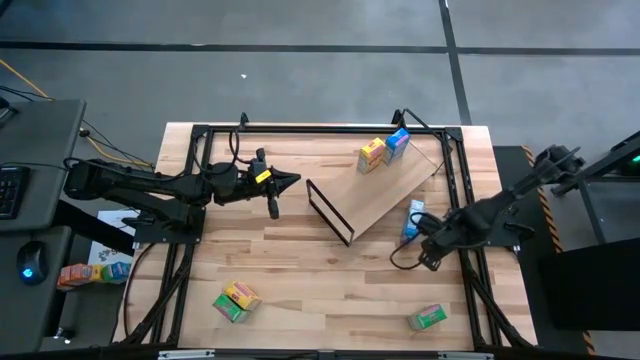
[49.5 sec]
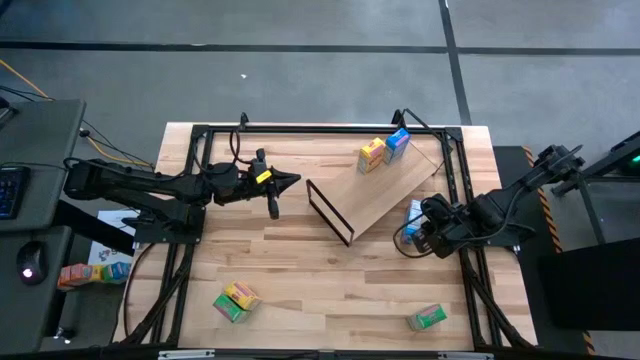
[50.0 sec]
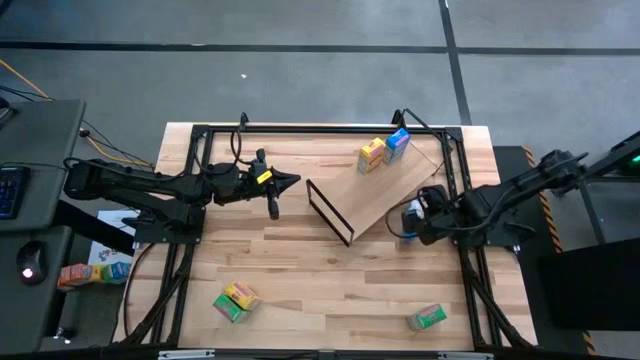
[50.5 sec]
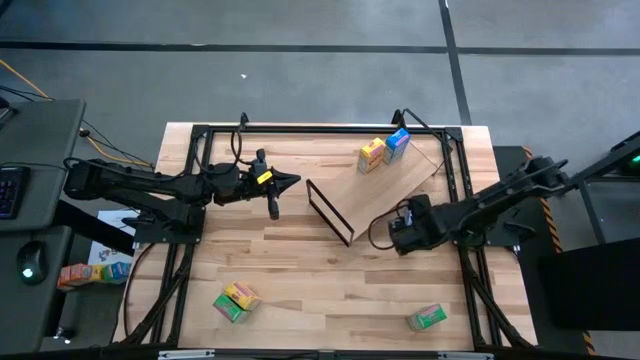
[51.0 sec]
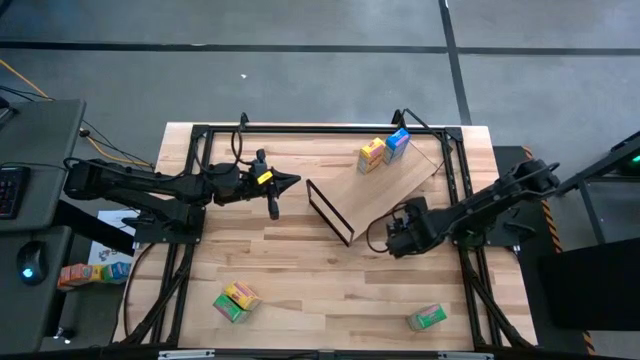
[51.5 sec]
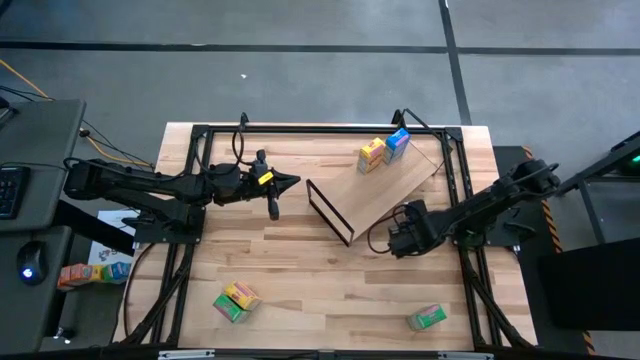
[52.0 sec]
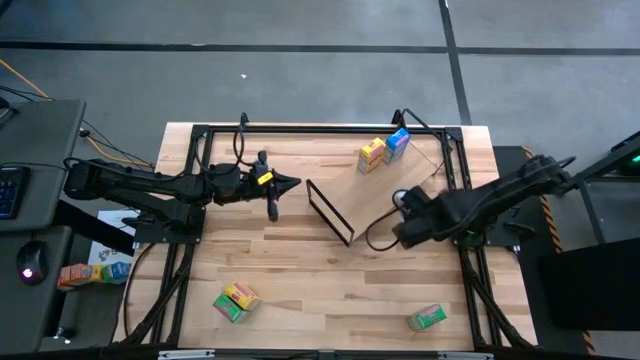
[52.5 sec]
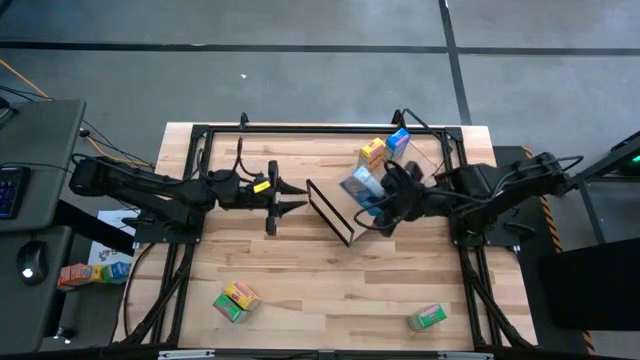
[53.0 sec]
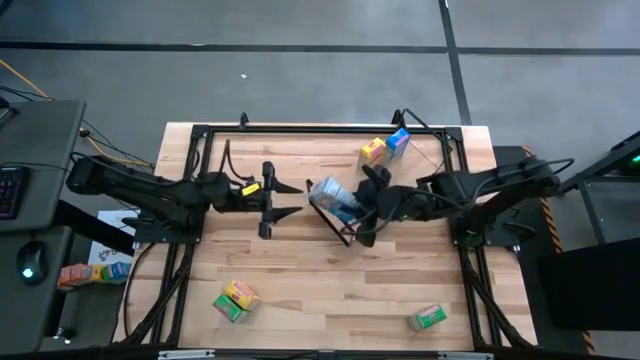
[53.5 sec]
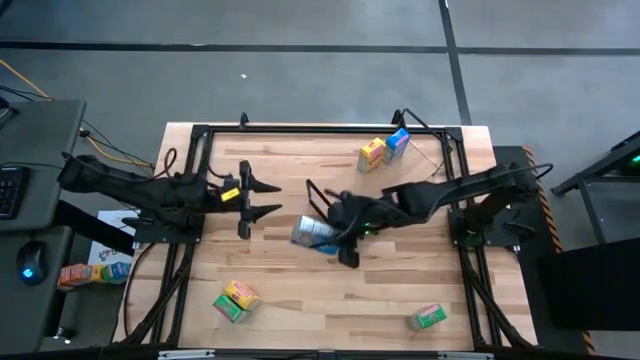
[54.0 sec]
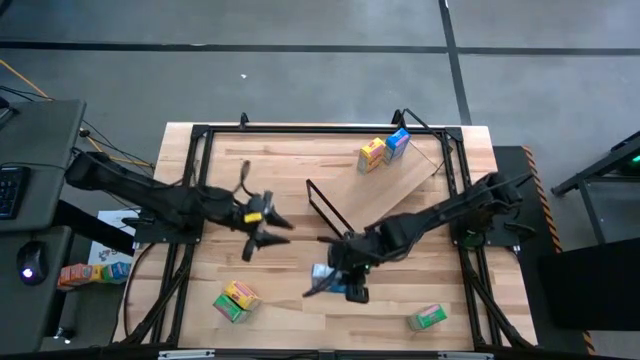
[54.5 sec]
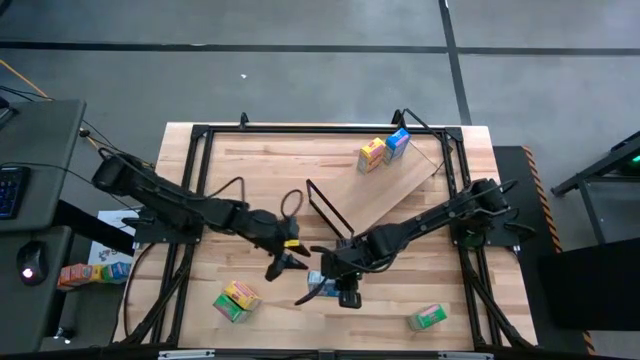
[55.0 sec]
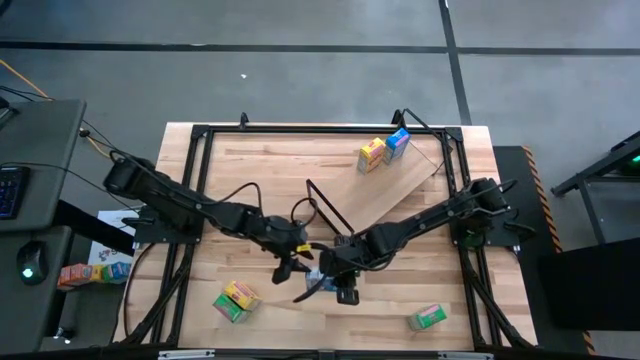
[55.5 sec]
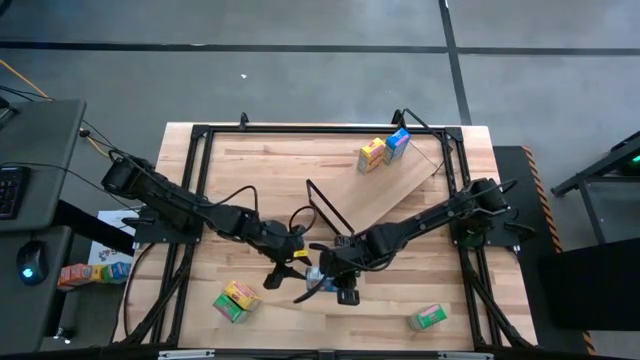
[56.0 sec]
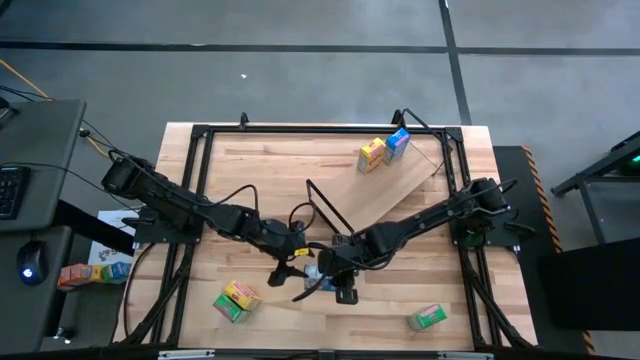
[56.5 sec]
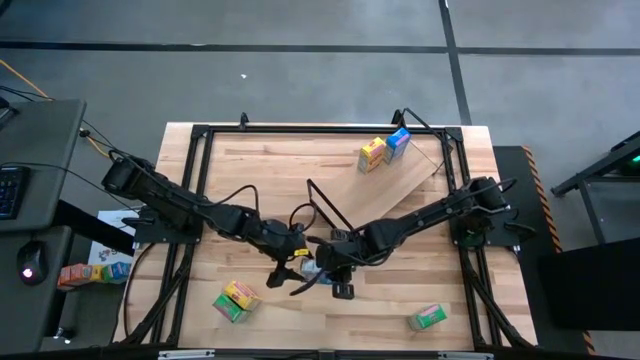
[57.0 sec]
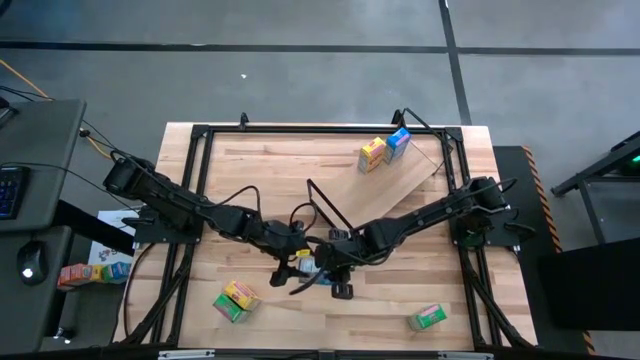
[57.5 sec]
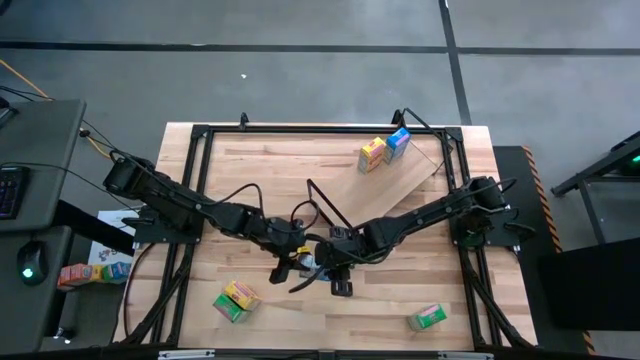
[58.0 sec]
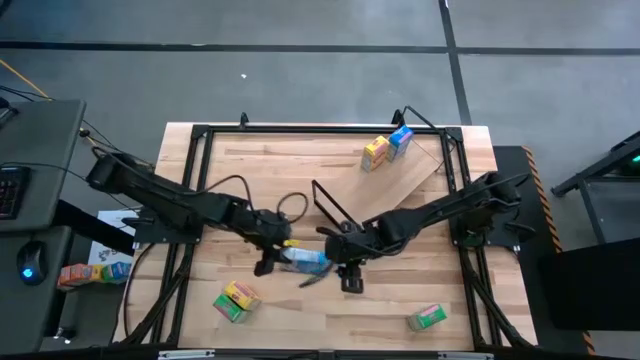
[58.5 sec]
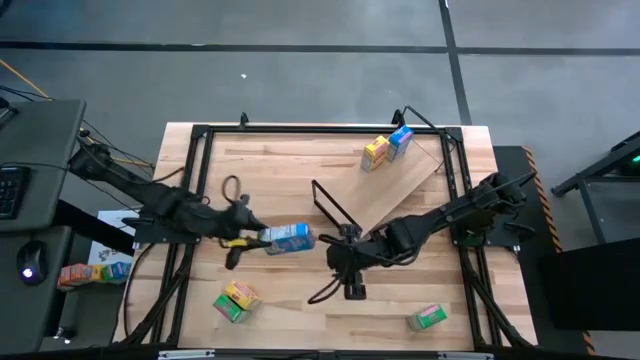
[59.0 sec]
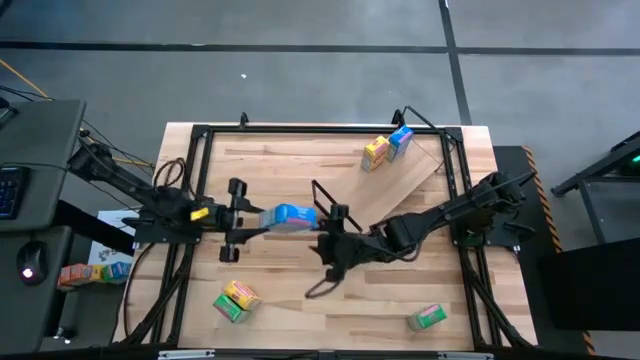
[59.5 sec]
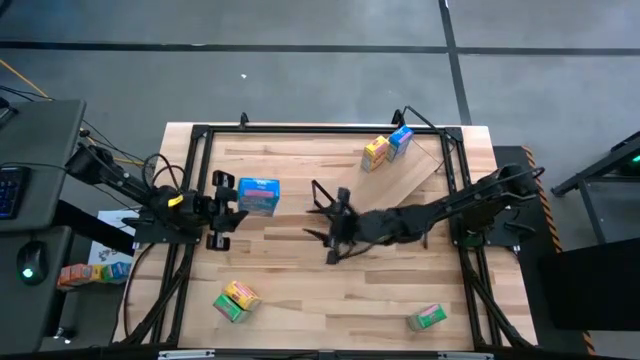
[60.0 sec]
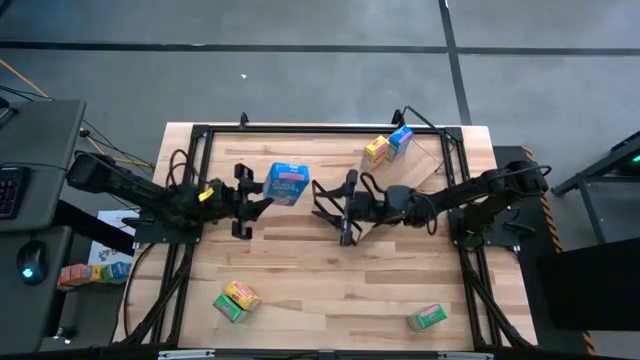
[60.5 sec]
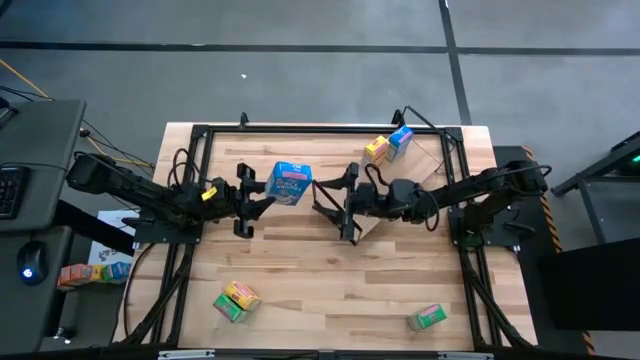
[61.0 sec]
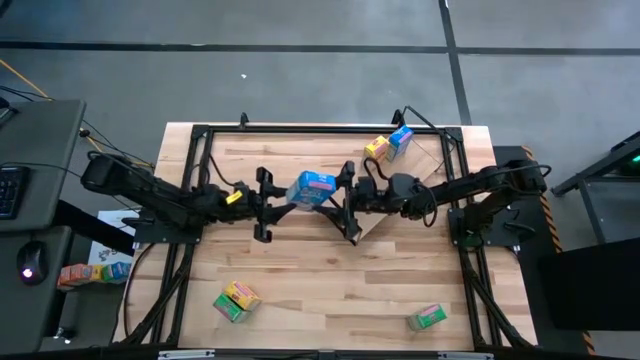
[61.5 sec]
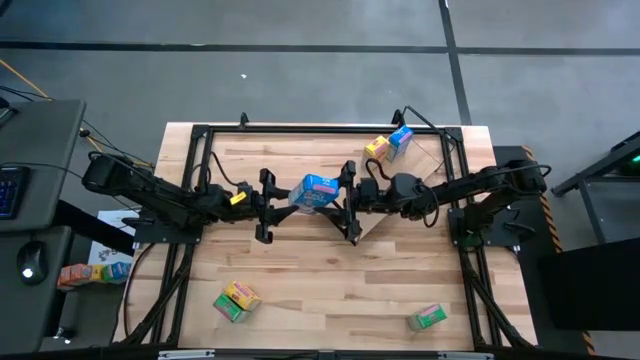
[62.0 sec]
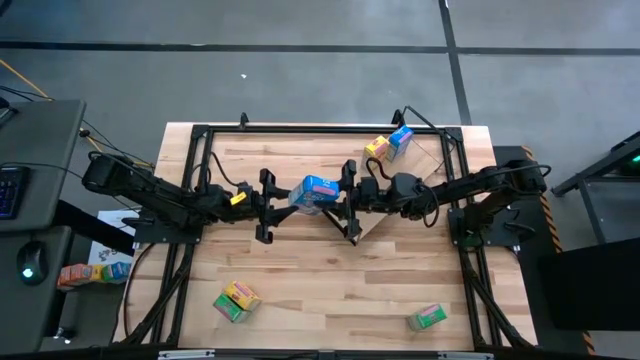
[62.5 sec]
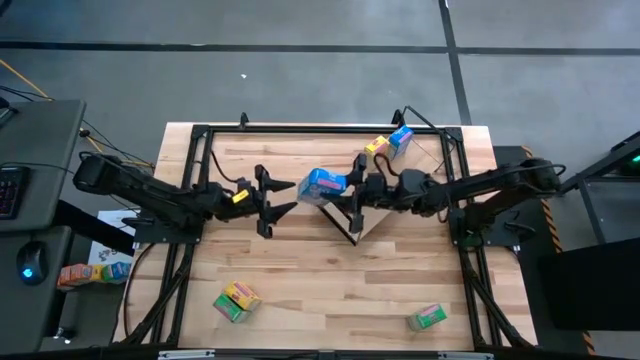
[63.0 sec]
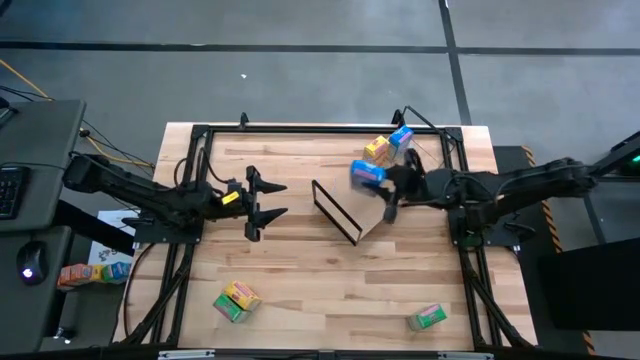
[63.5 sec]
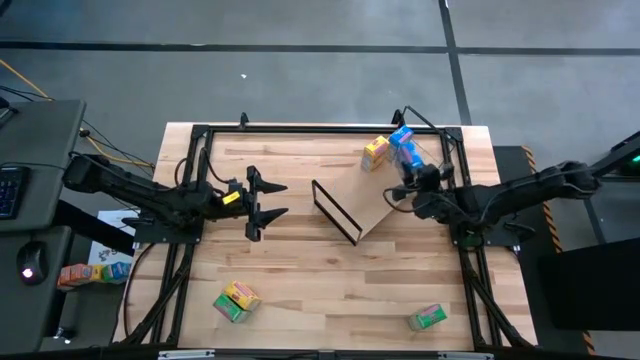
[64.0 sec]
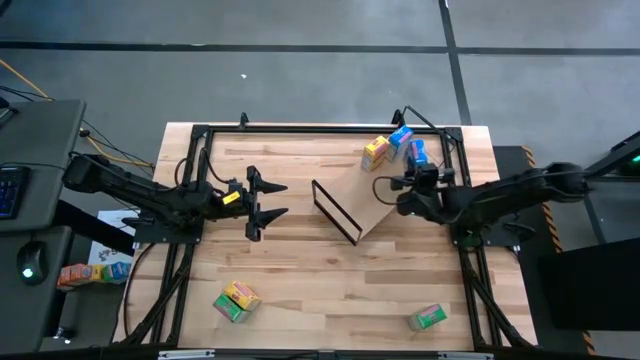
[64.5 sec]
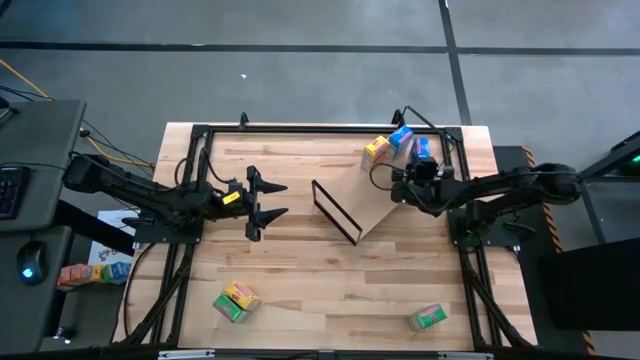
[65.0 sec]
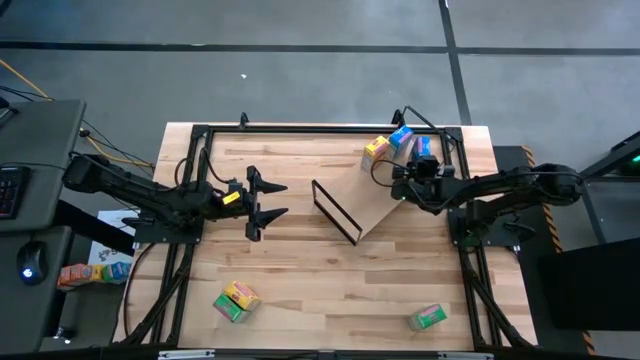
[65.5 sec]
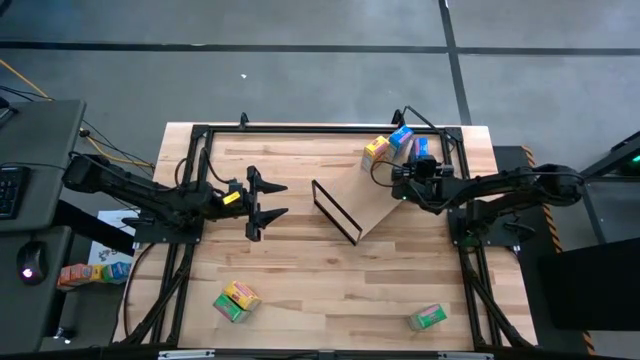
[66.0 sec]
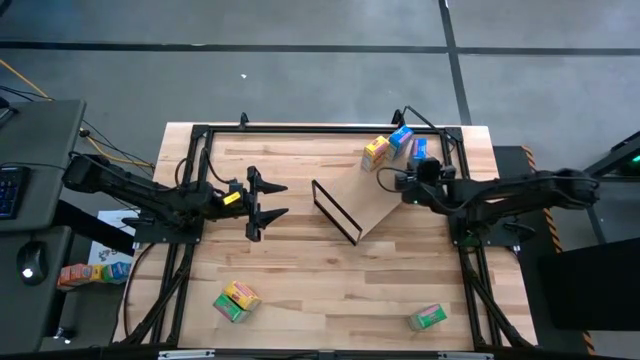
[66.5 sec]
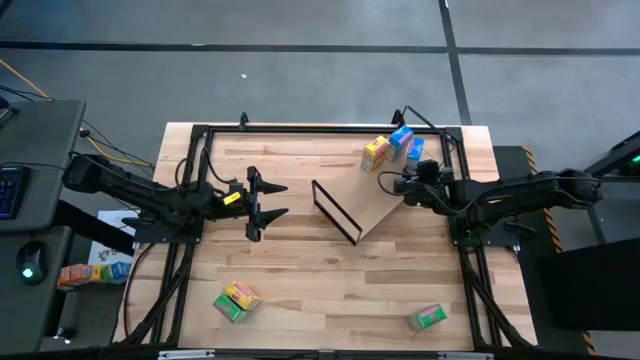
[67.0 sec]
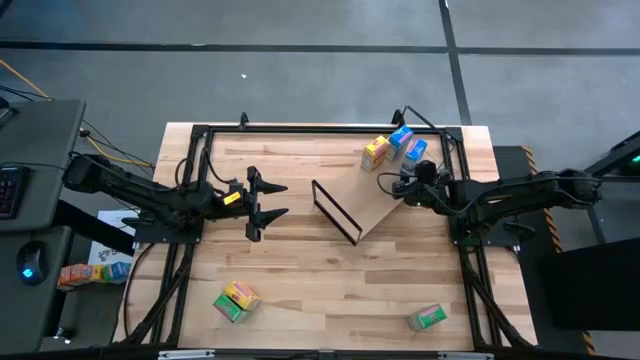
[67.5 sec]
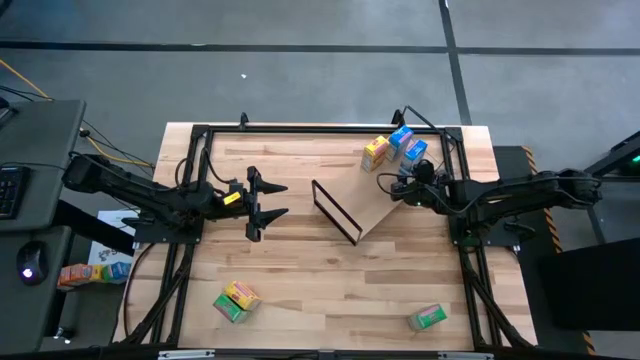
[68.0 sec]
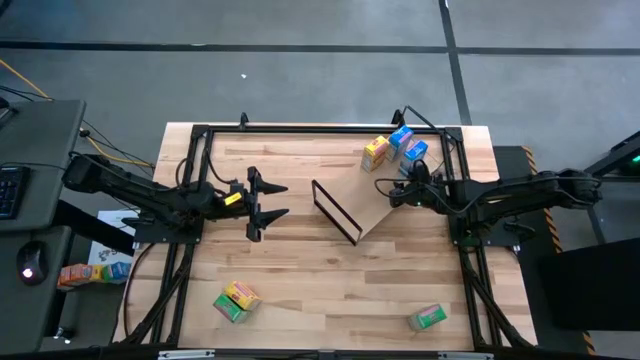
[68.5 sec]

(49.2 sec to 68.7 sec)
Task: Stack cereal on shelf
Put the blue cereal box on the shelf aligned with the blue cereal box

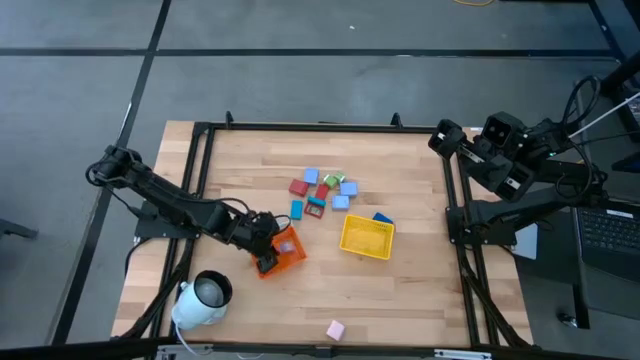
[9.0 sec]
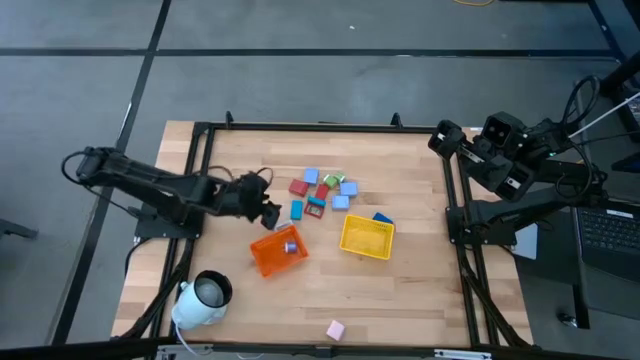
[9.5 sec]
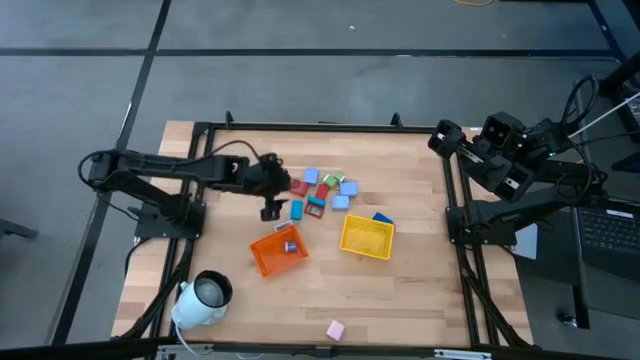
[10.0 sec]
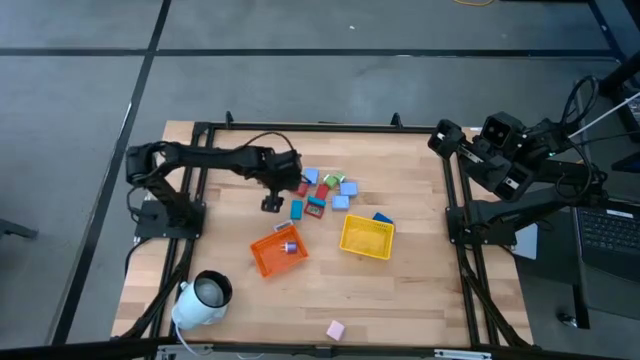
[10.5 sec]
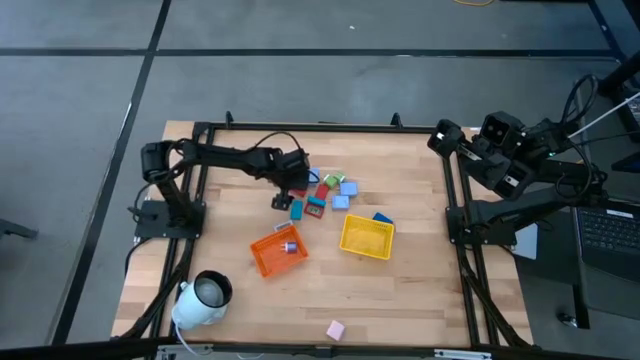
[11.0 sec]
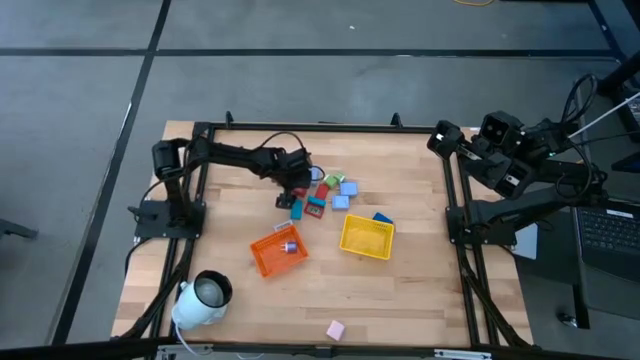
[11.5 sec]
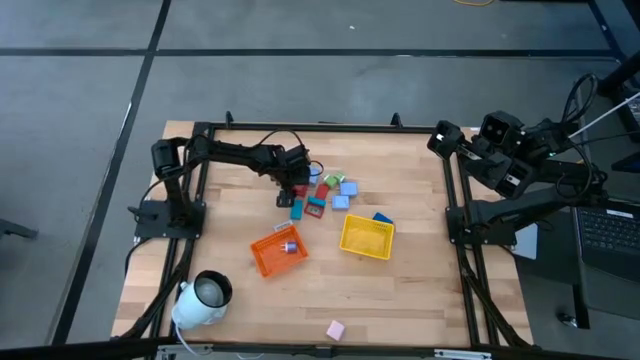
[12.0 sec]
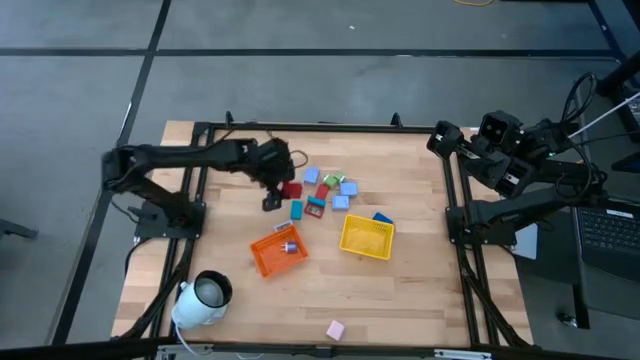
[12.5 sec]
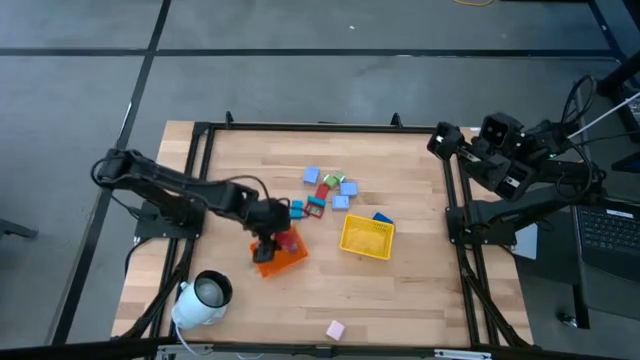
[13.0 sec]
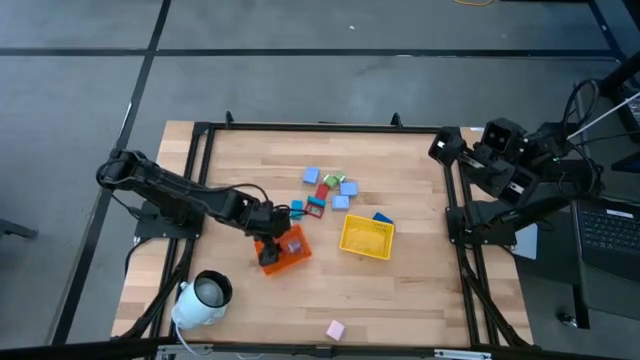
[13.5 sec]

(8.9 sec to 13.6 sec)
Task: Pick & Place Office items
Put the red charger adapter into the orange bin
